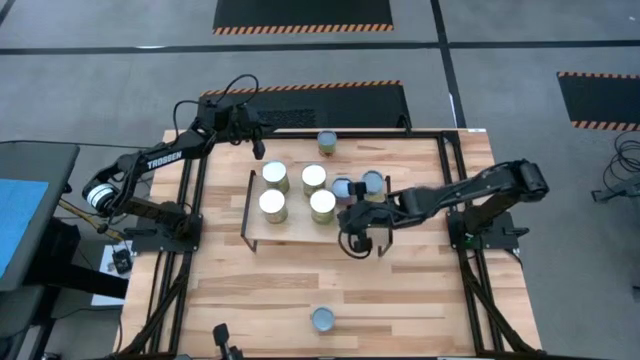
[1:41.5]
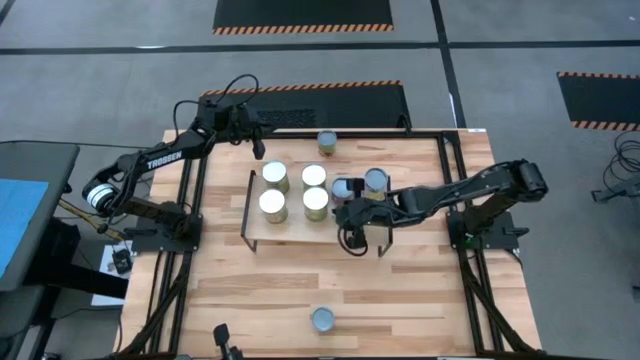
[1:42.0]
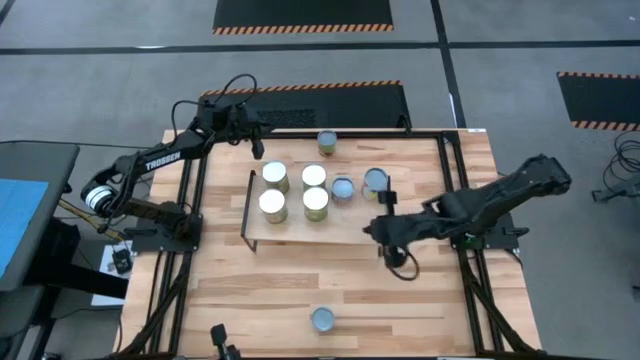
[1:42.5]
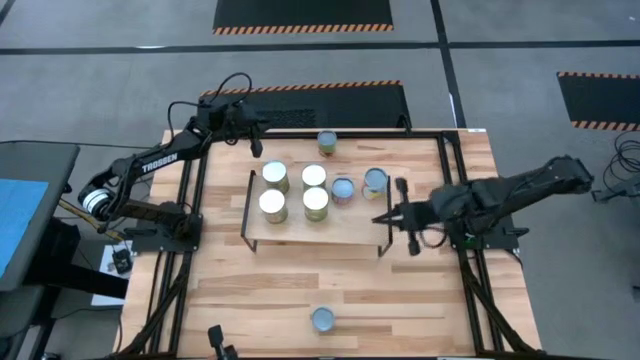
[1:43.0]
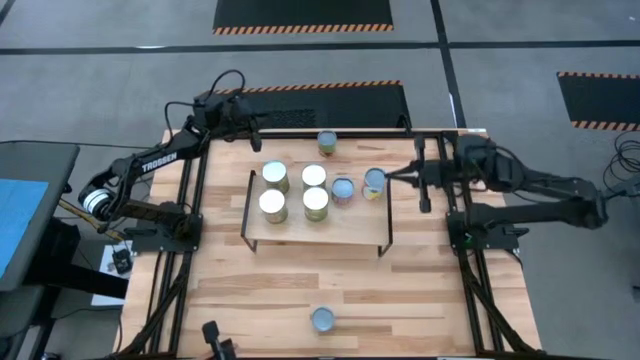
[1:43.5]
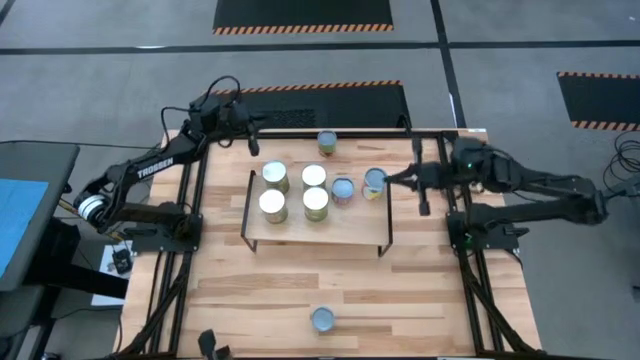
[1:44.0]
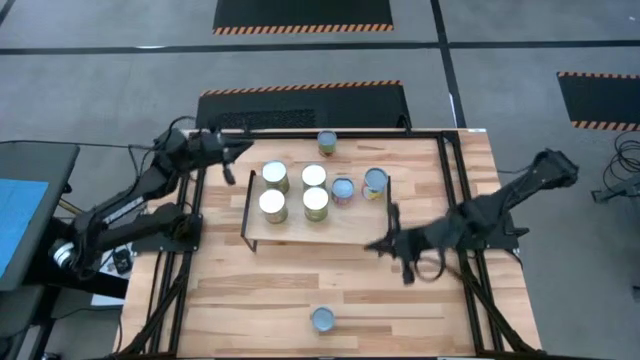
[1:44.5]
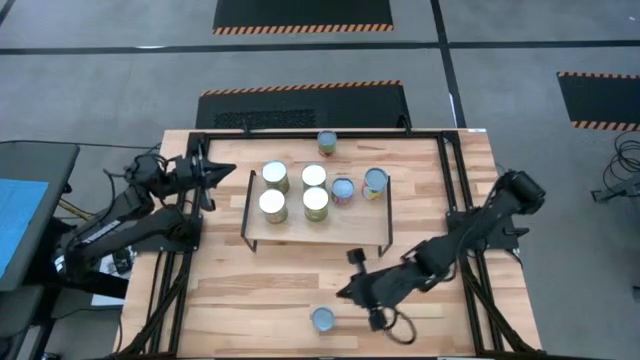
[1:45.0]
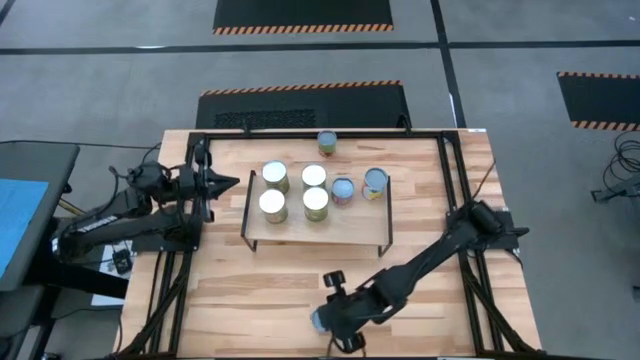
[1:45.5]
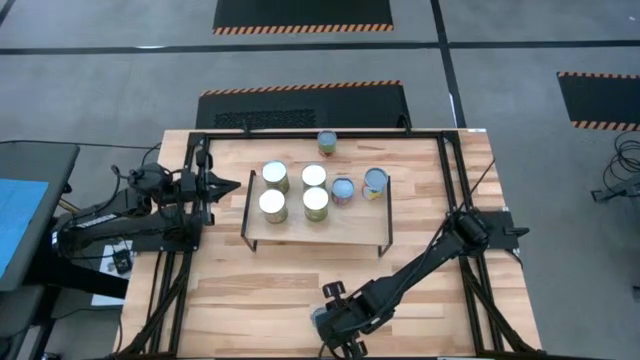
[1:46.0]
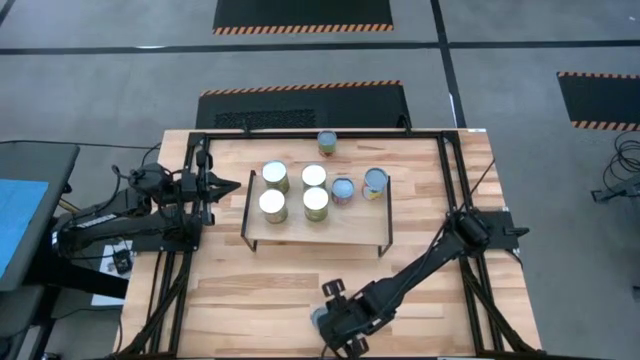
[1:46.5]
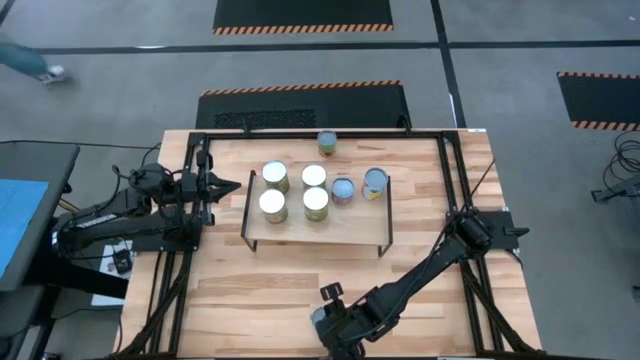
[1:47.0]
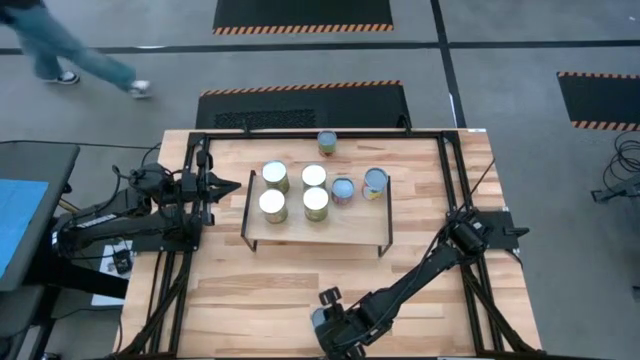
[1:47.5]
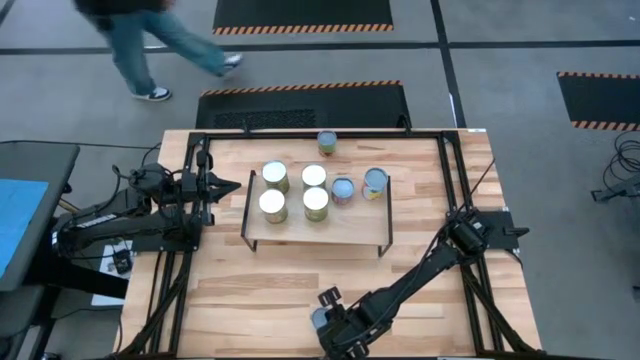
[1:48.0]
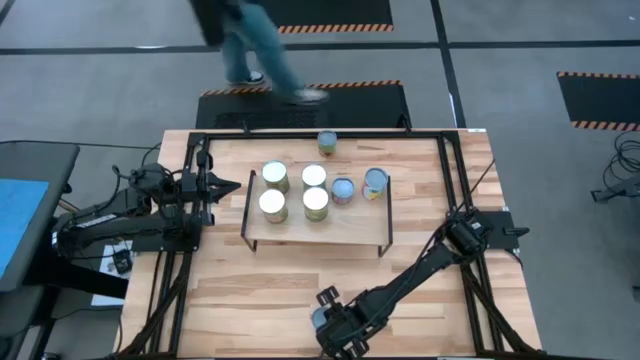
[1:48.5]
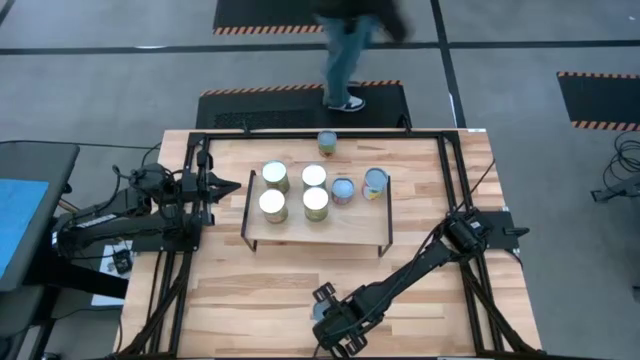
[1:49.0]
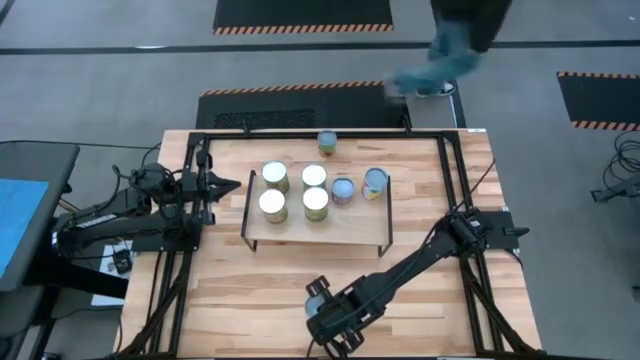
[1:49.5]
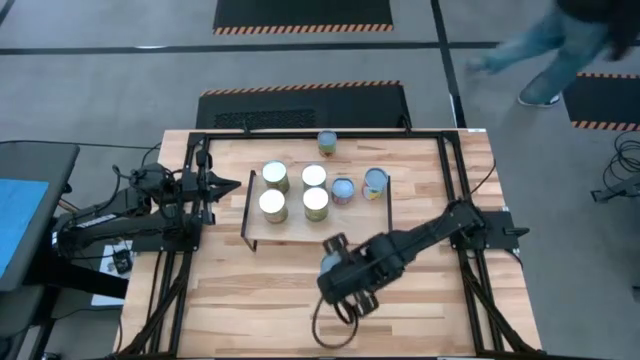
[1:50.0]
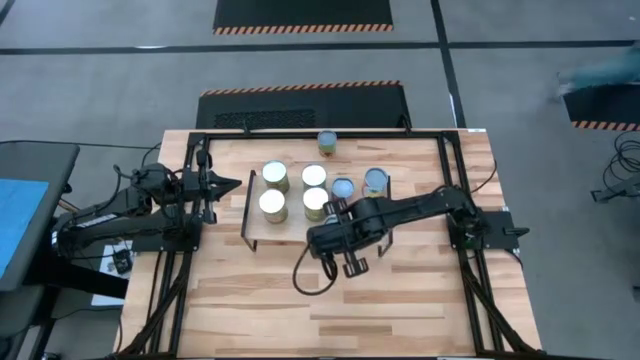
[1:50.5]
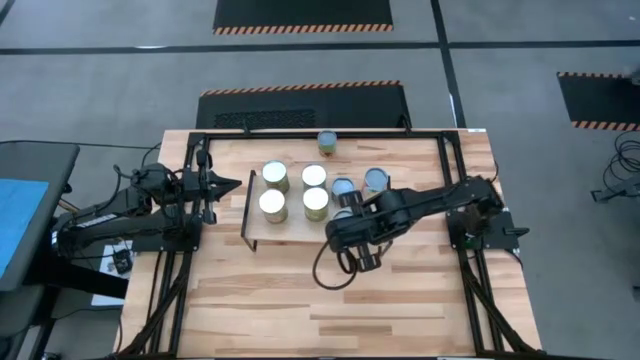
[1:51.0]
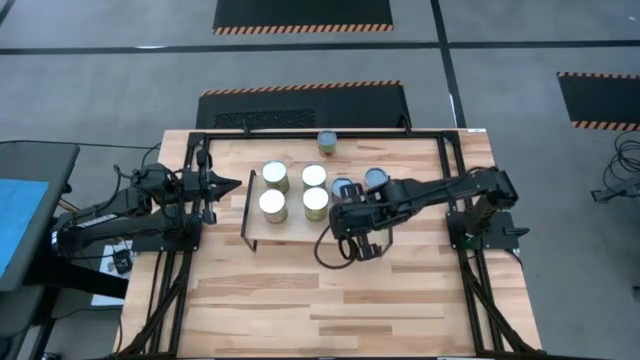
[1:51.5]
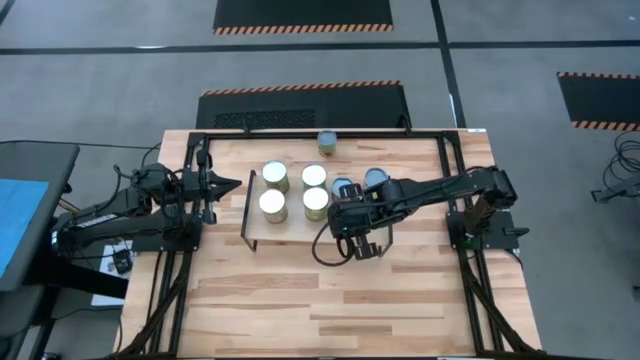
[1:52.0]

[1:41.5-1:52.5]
Task: Pick and place cans onto a shelf
Put the canned mandarin oranges on the shelf aligned with the canned corn

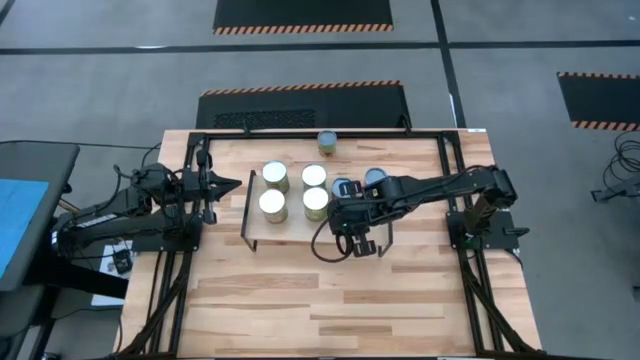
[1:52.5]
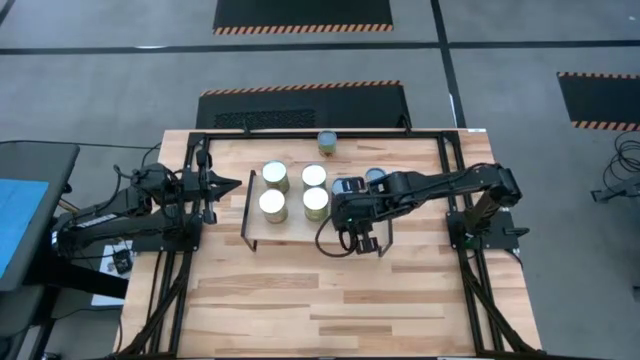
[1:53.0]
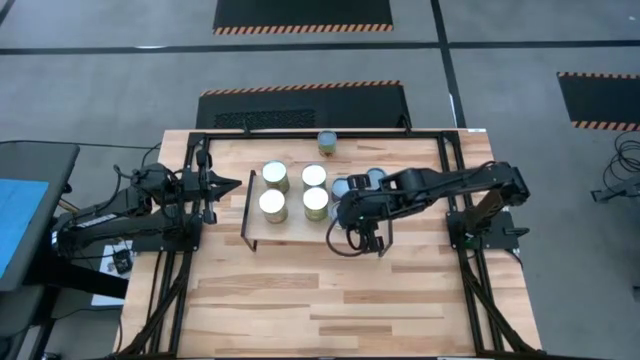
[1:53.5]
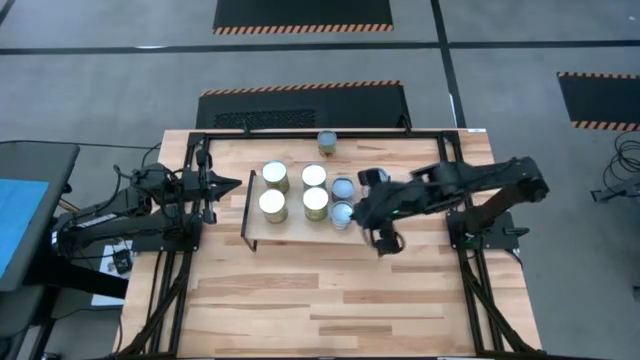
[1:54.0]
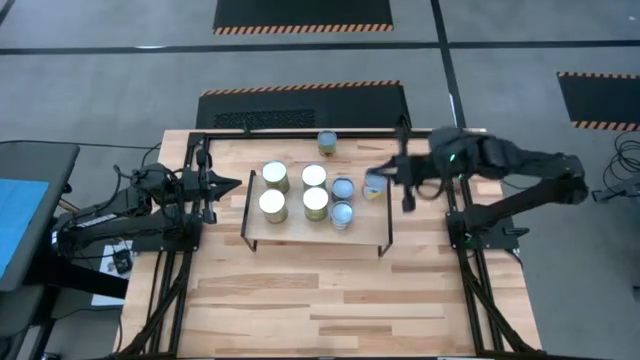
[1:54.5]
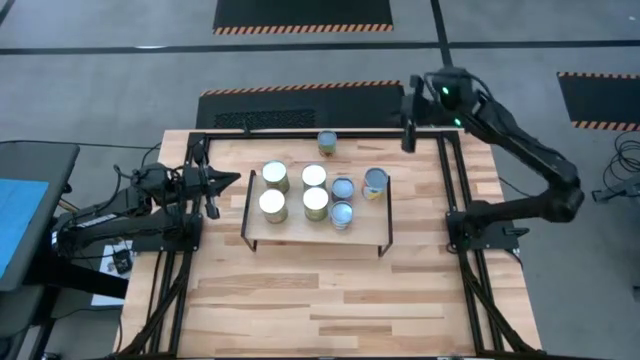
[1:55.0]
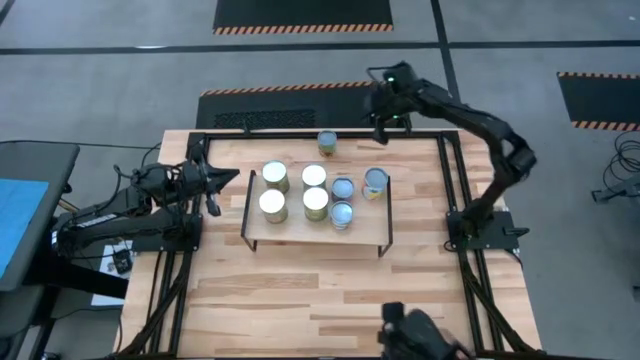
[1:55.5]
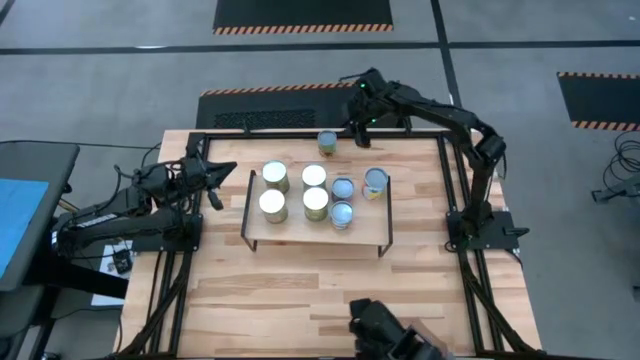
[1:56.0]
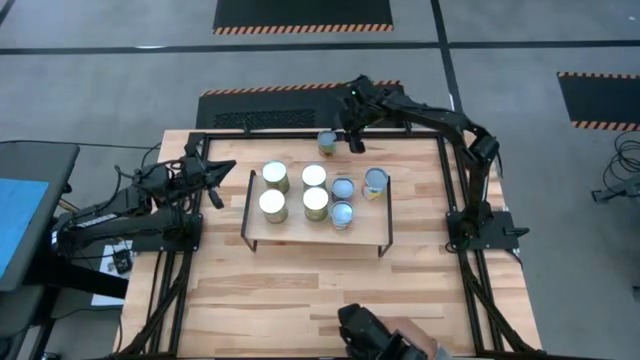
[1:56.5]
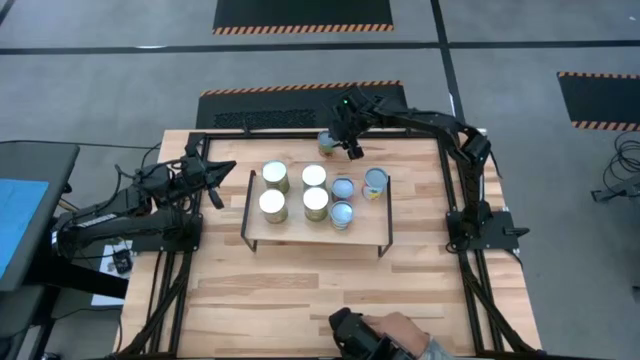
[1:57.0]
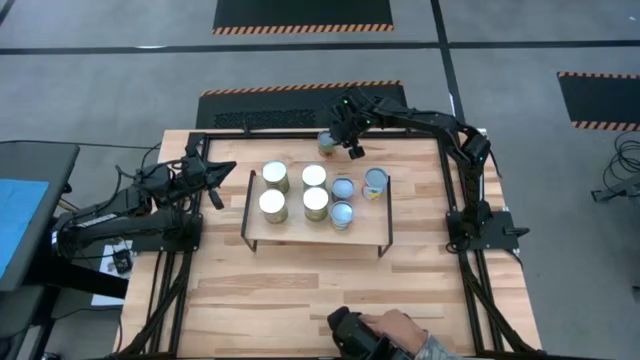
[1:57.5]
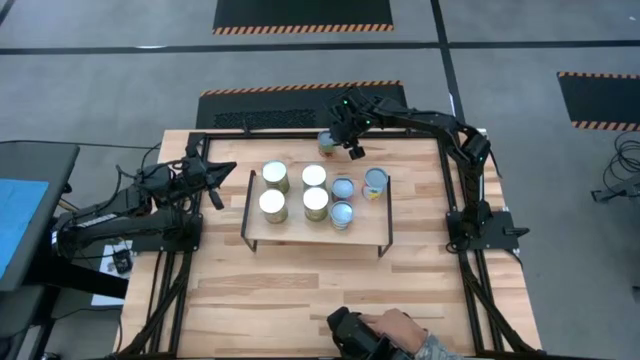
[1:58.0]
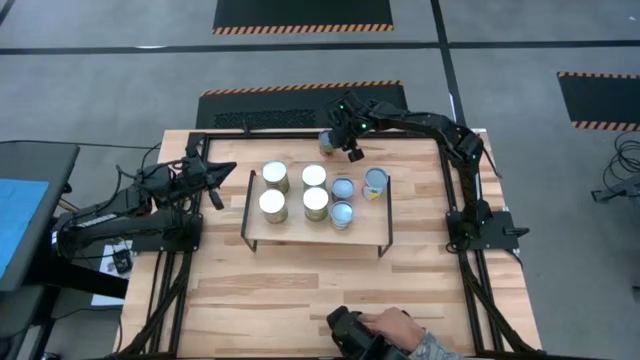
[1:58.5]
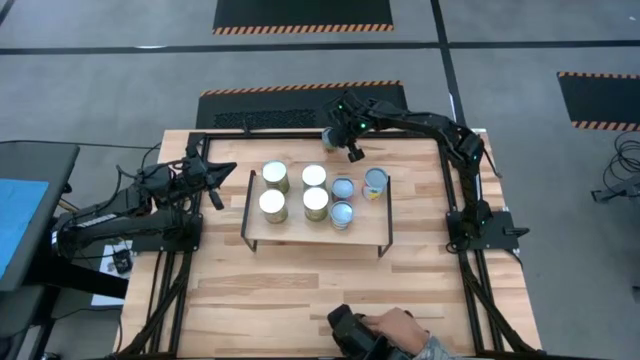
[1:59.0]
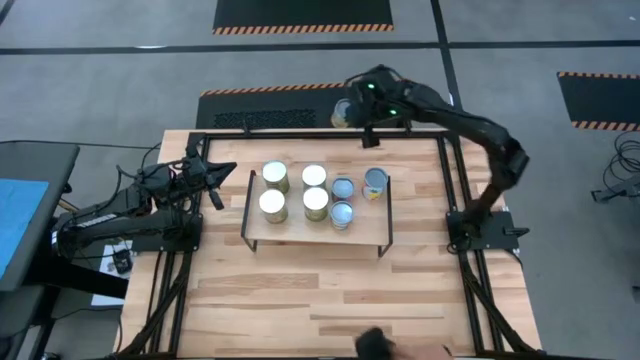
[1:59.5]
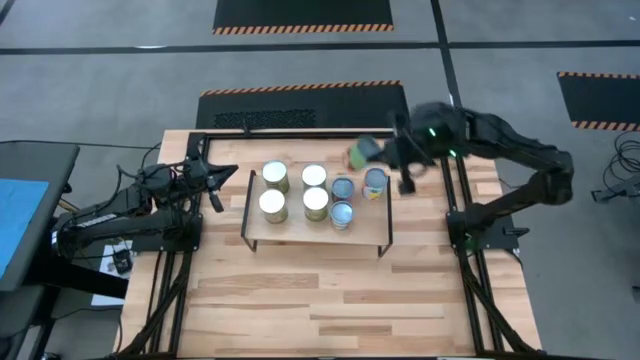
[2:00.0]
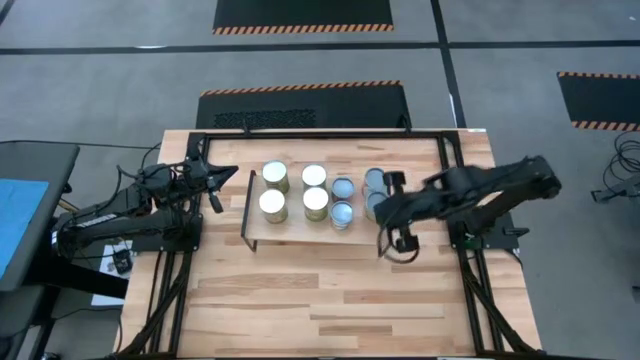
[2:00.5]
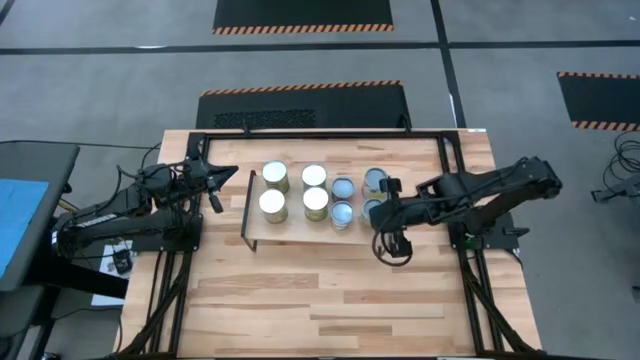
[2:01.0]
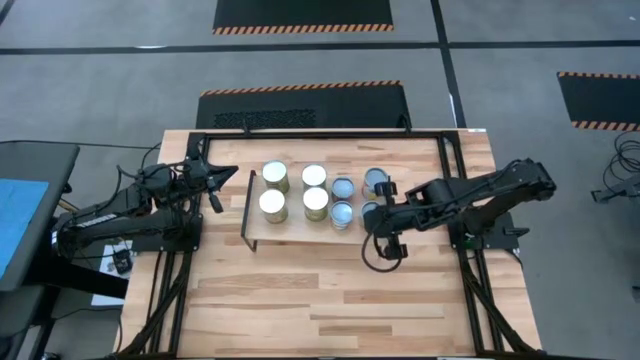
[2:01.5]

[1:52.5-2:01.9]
Put the green can on the shelf aligned with the canned pineapple
